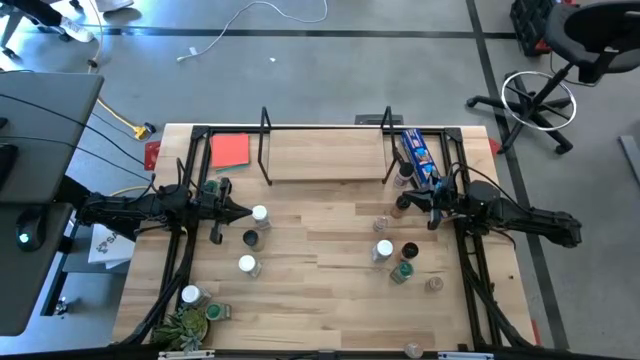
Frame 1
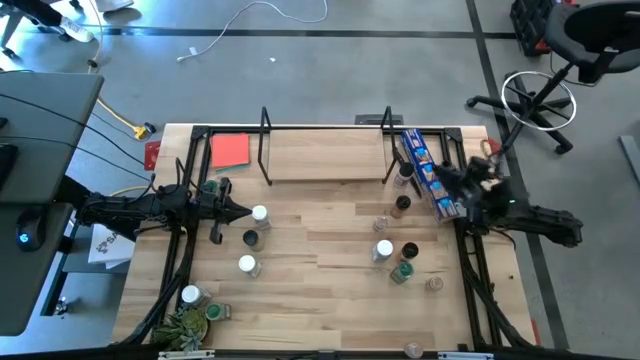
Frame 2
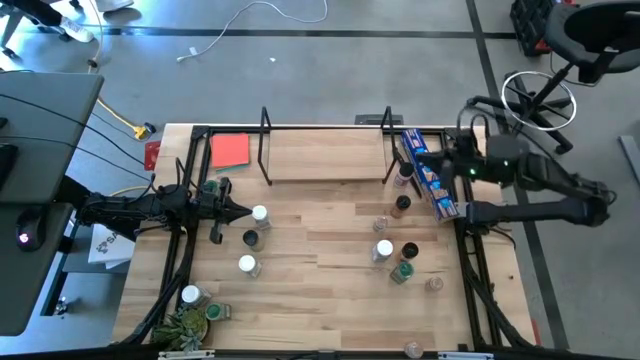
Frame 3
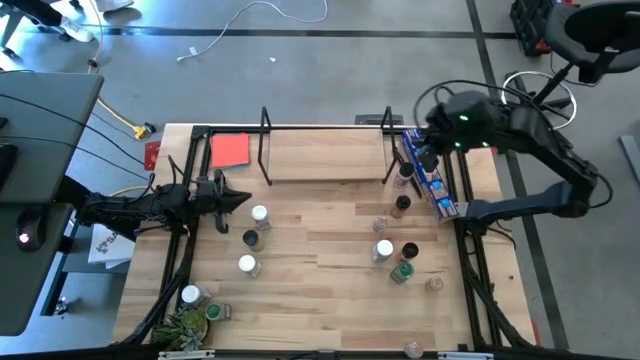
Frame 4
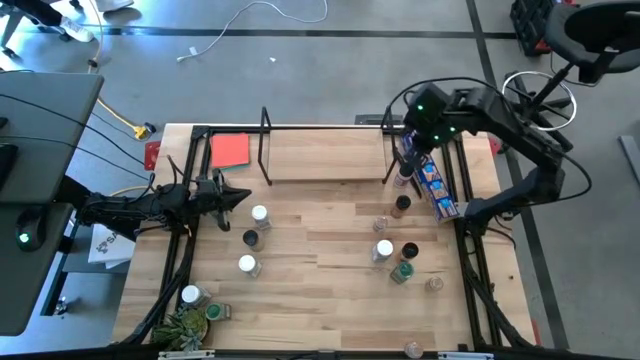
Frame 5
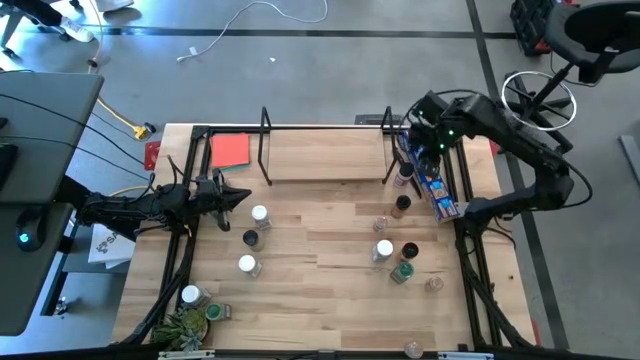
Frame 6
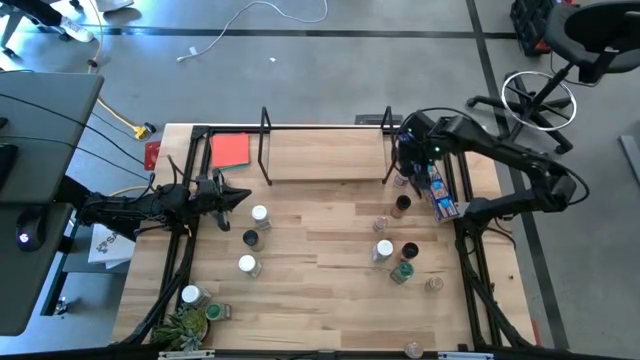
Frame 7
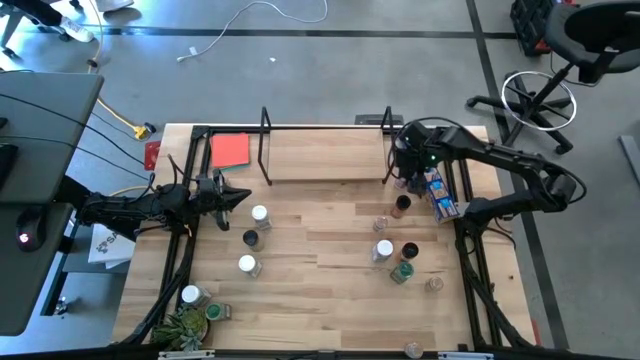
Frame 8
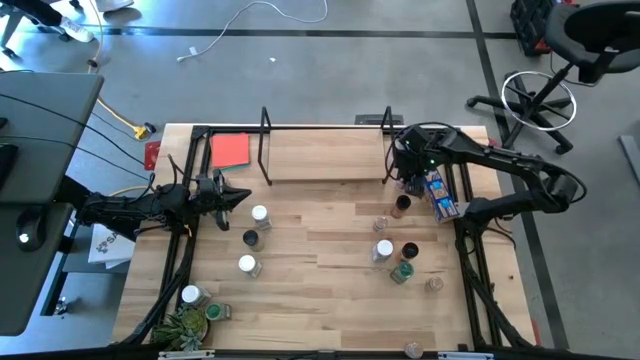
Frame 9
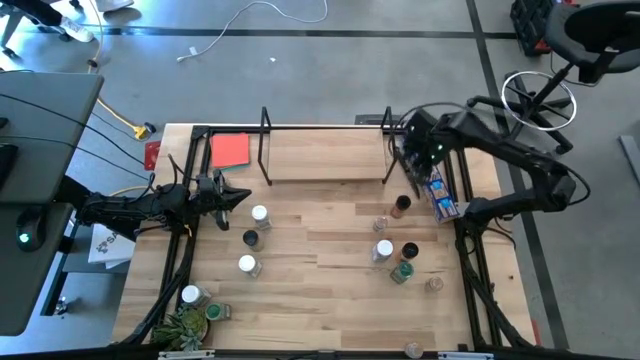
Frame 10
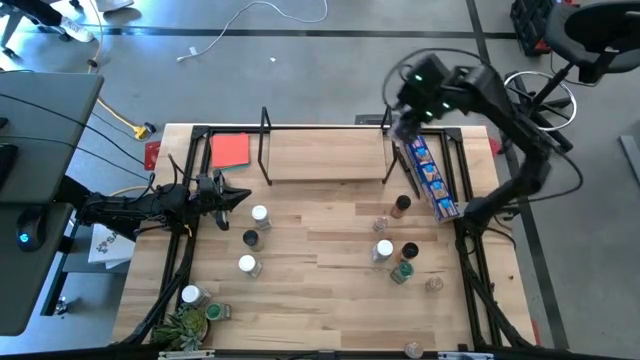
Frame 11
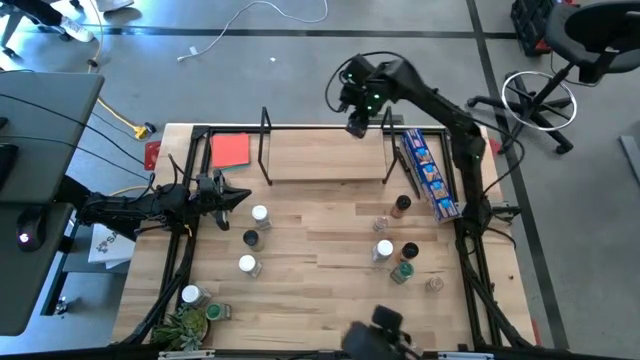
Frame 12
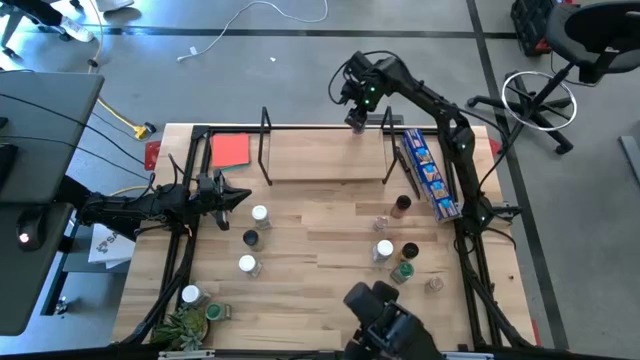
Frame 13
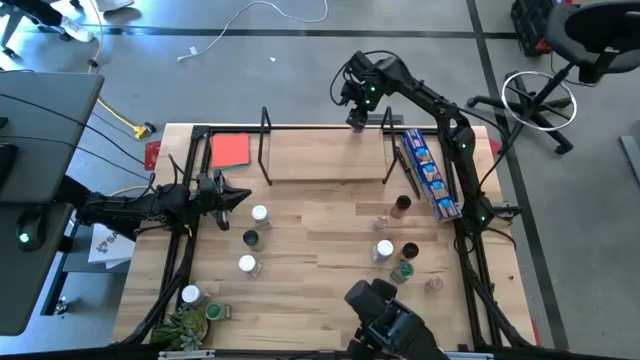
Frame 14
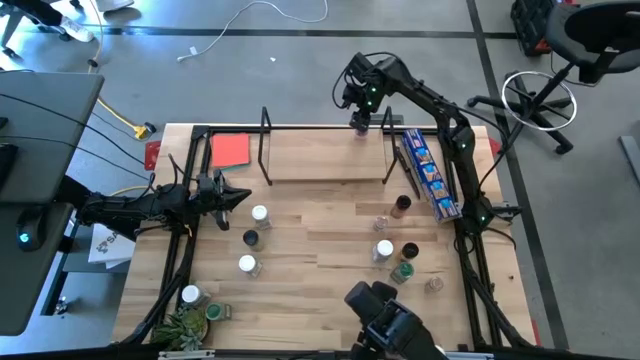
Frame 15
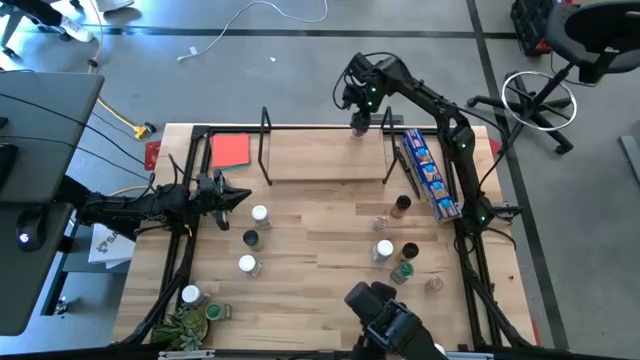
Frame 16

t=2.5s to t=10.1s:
Task: Shelf spices
Put the top right black seasoning bottle on the shelf

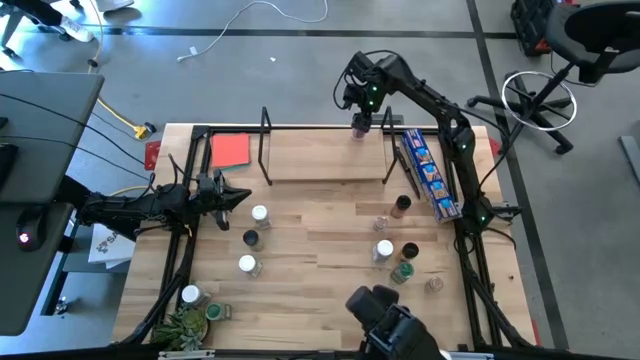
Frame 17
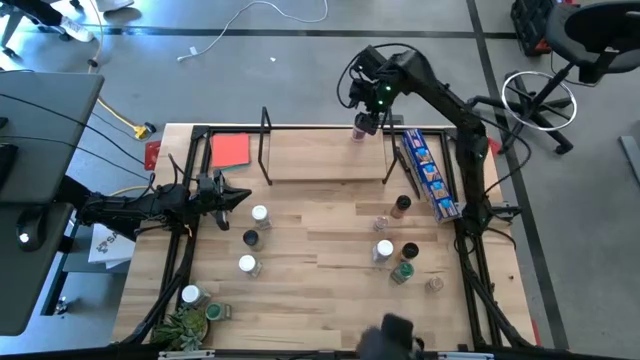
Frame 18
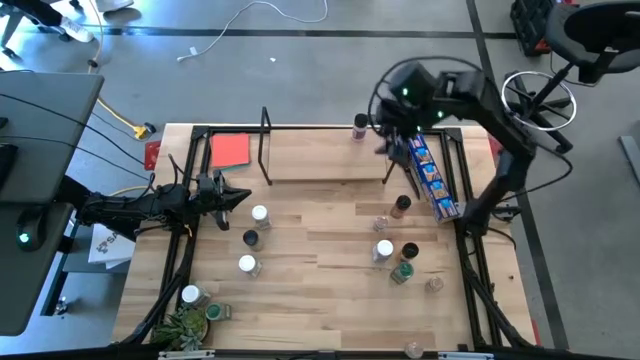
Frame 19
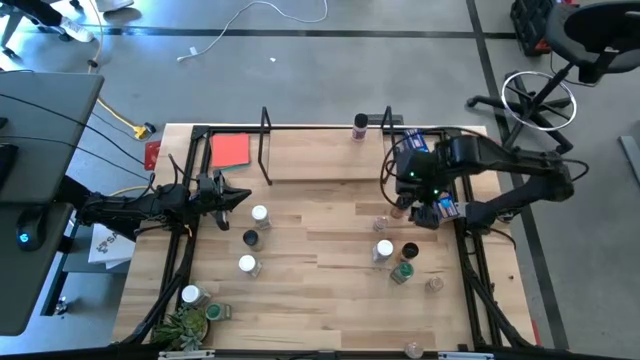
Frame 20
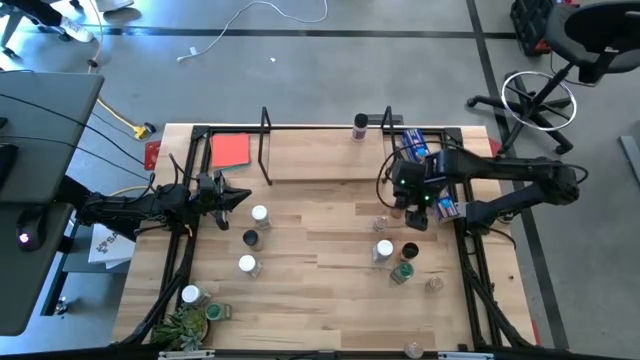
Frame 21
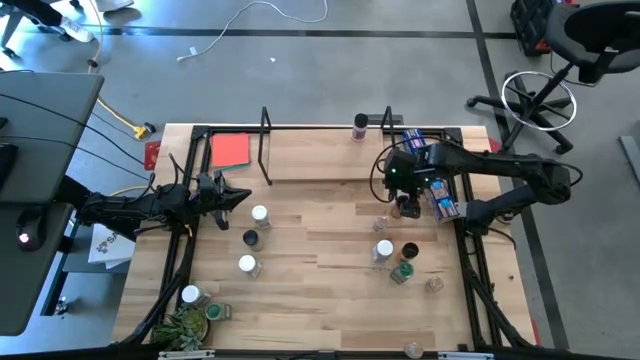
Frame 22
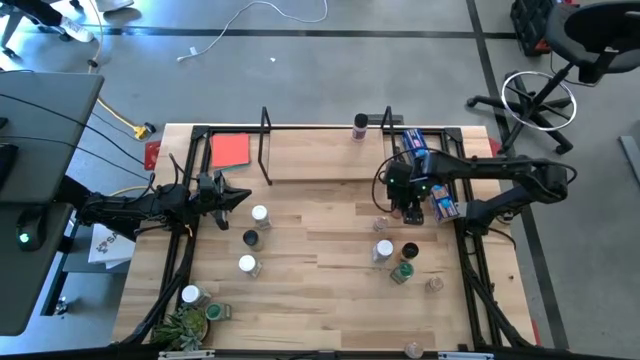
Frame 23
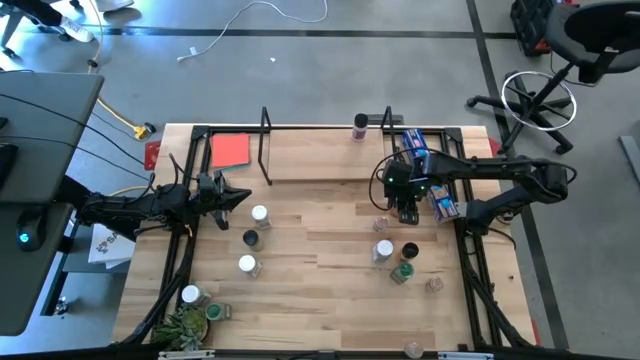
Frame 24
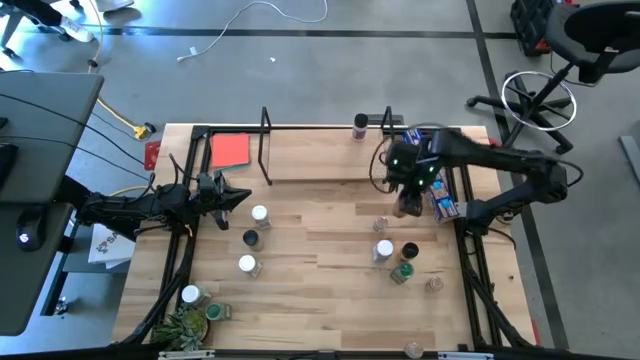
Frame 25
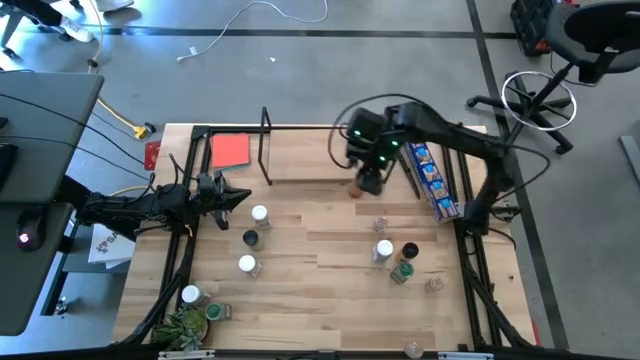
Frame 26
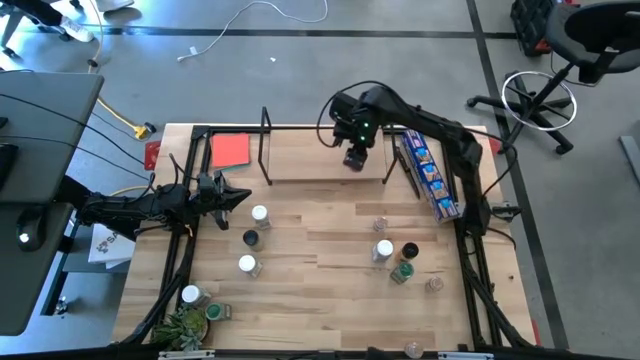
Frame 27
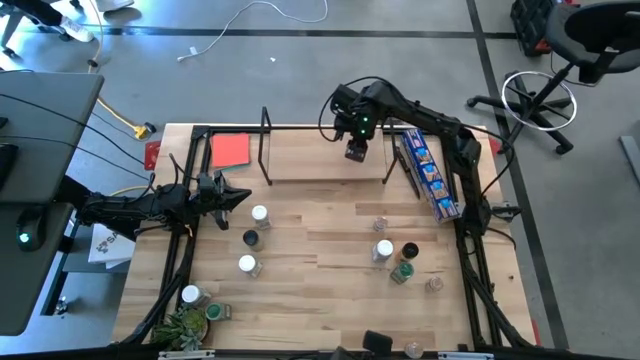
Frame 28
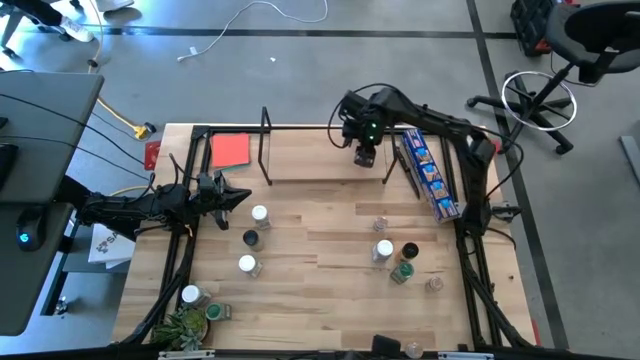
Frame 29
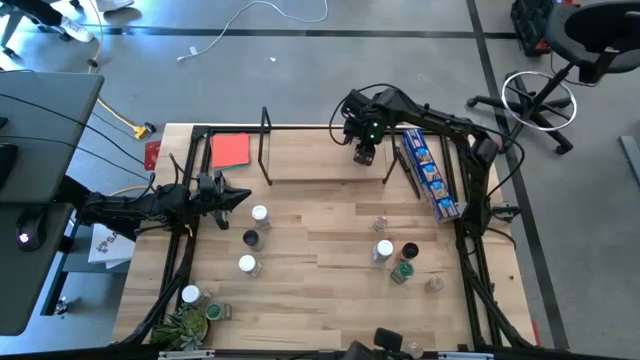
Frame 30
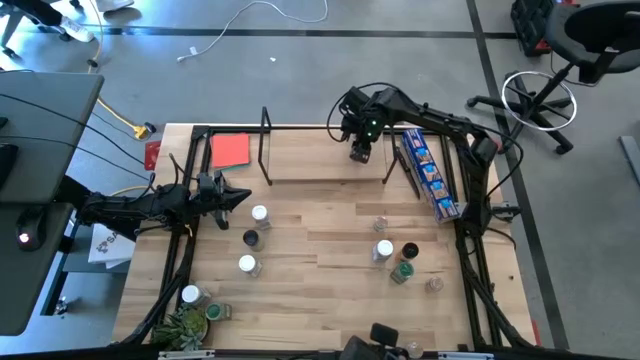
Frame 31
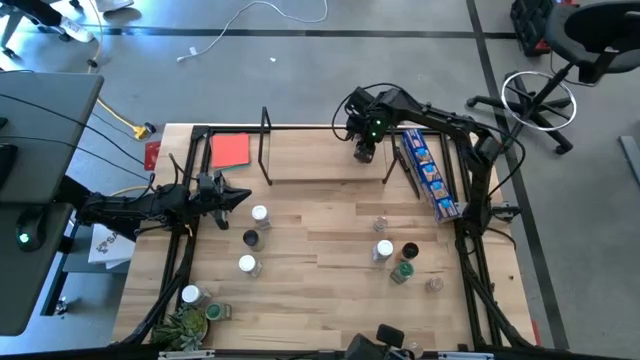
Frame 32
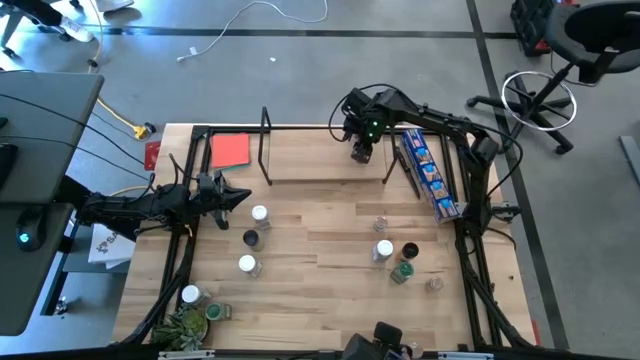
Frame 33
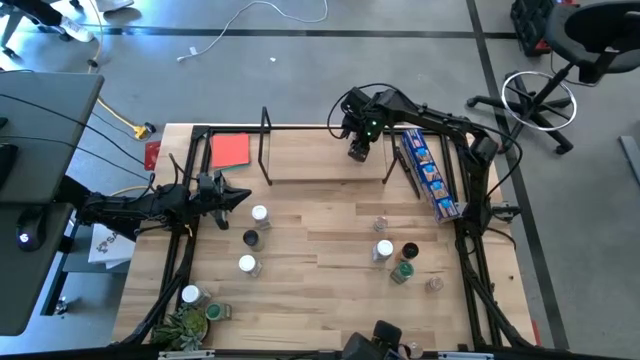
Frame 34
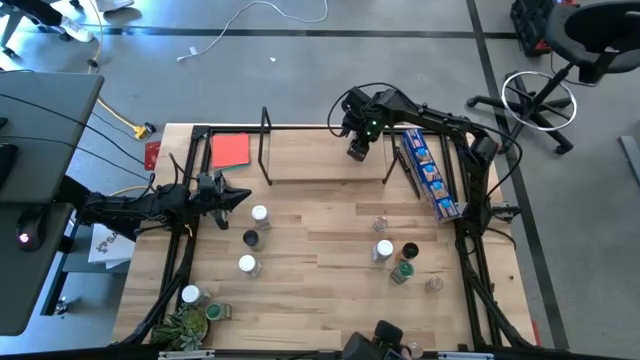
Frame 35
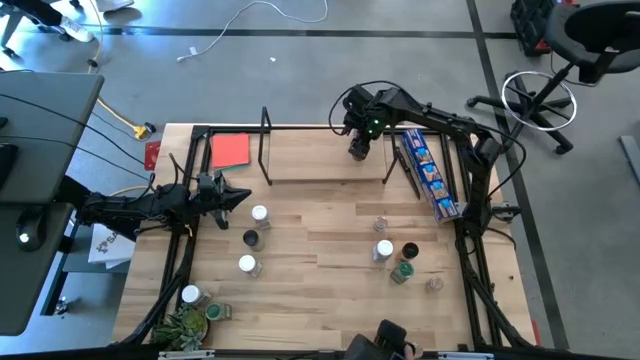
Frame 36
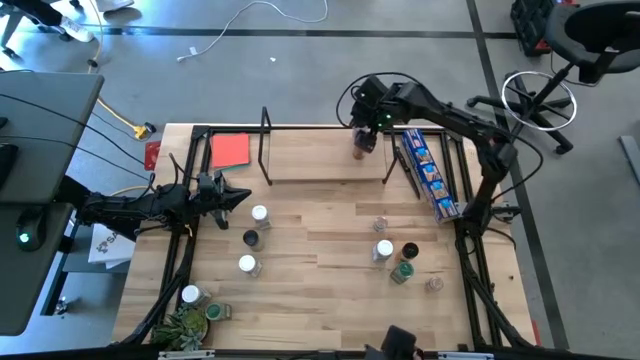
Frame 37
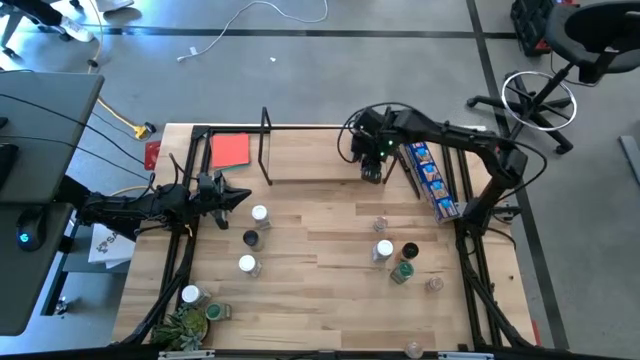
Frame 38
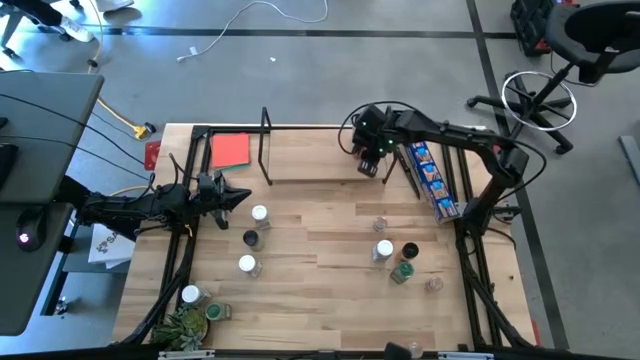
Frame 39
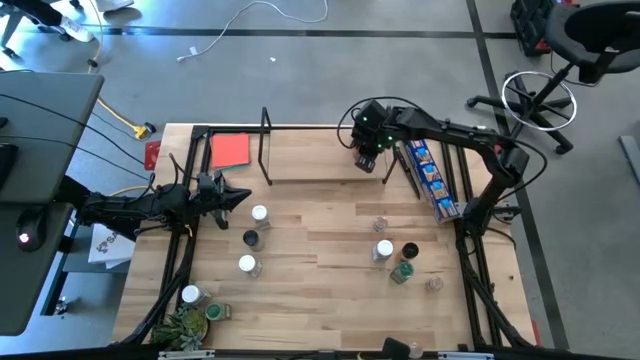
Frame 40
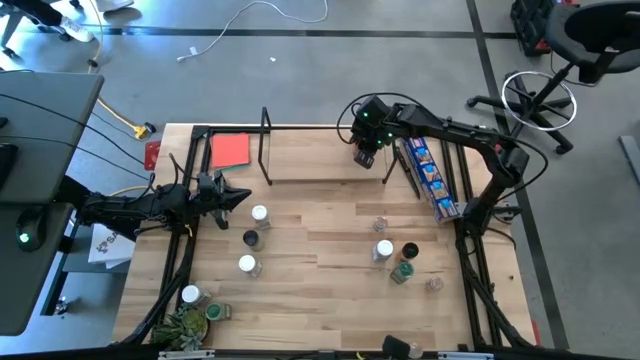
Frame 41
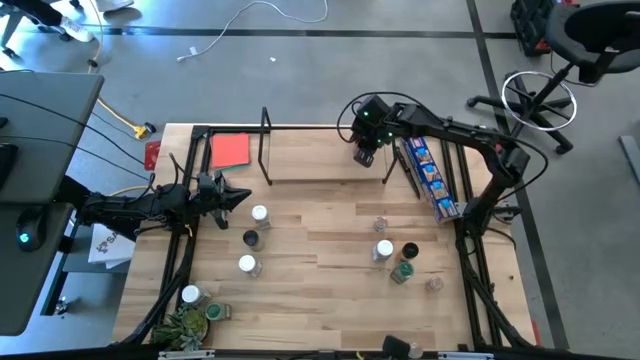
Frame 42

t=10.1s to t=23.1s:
Put the top right black seasoning bottle on the shelf aligned with the other black seasoning bottle
